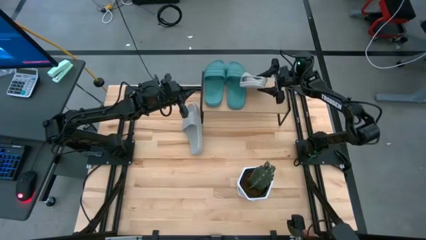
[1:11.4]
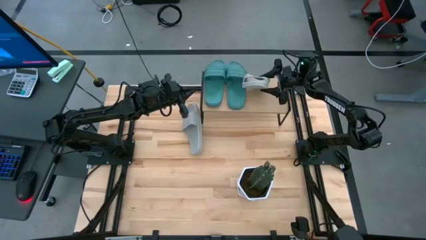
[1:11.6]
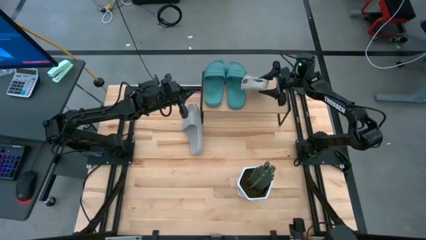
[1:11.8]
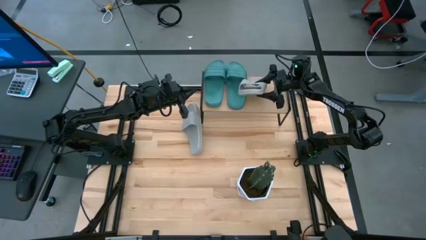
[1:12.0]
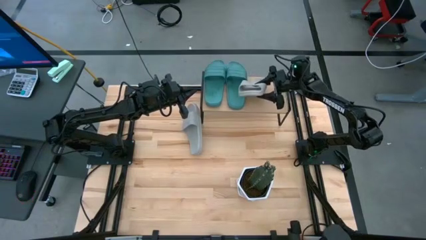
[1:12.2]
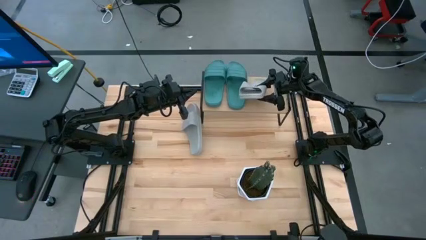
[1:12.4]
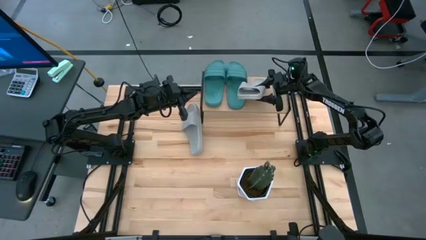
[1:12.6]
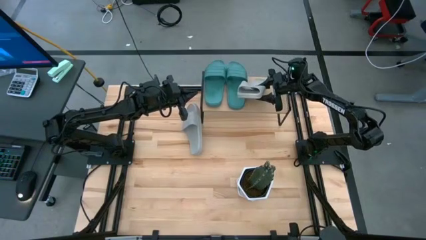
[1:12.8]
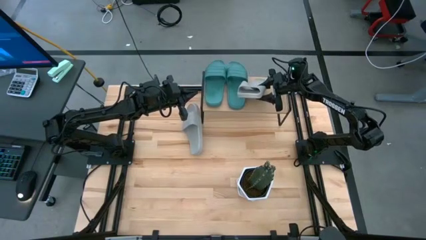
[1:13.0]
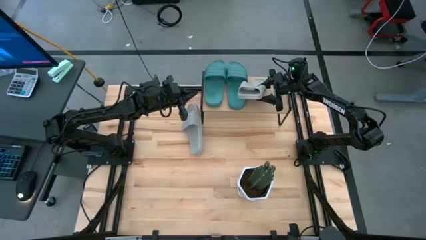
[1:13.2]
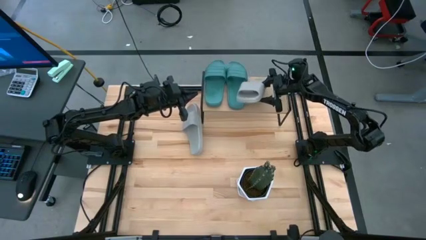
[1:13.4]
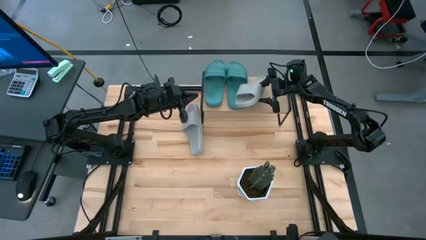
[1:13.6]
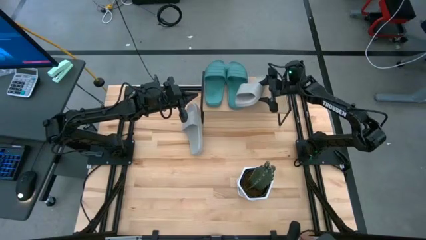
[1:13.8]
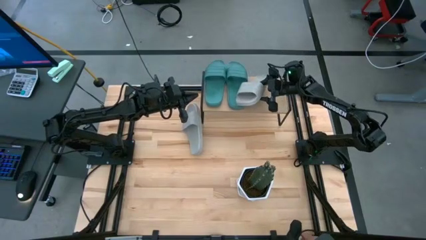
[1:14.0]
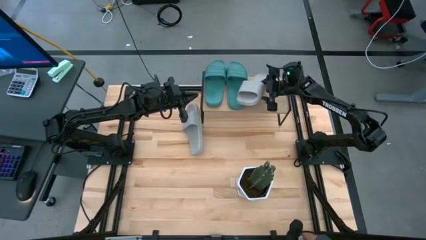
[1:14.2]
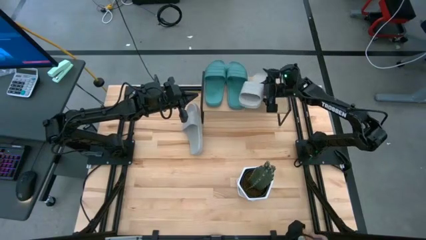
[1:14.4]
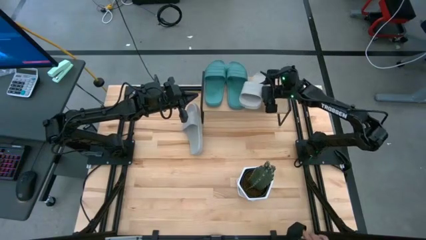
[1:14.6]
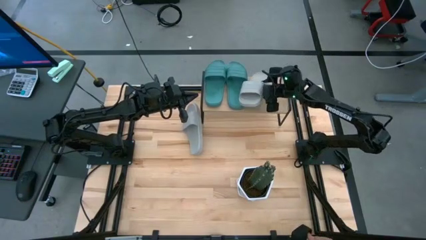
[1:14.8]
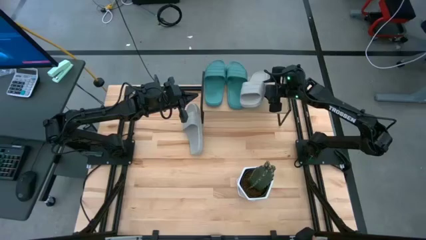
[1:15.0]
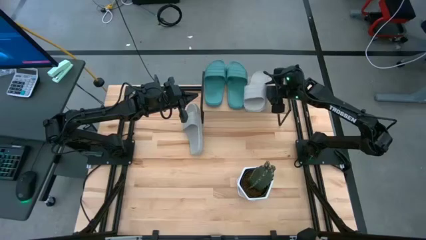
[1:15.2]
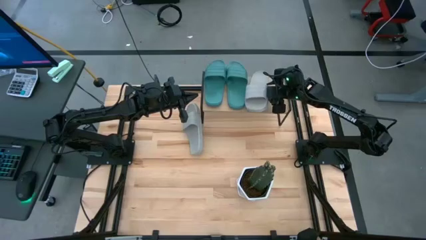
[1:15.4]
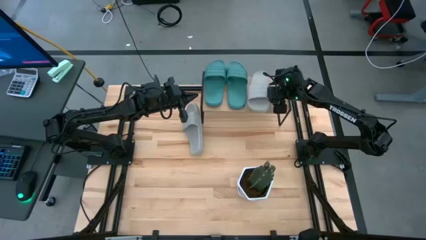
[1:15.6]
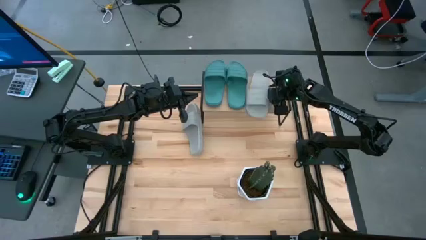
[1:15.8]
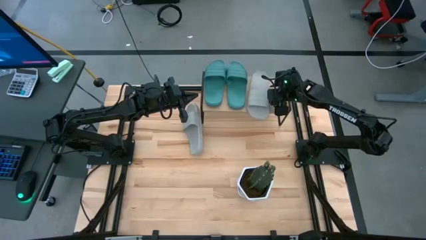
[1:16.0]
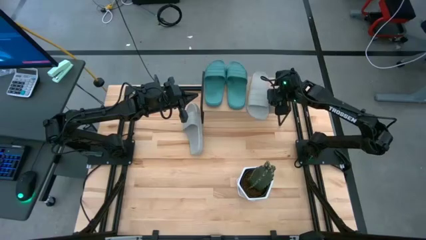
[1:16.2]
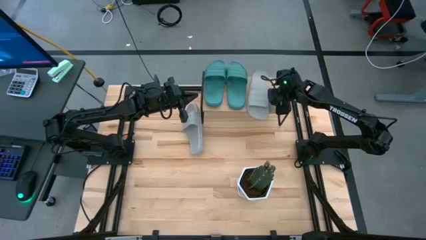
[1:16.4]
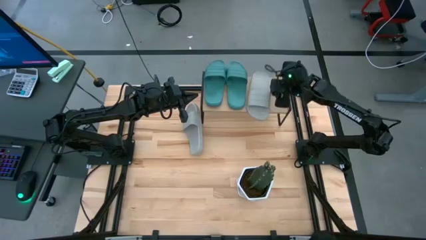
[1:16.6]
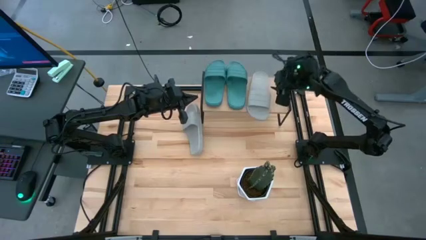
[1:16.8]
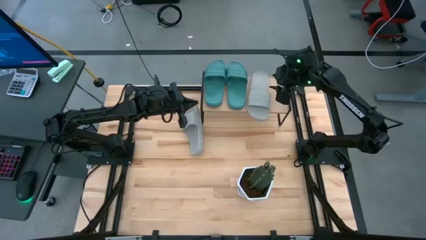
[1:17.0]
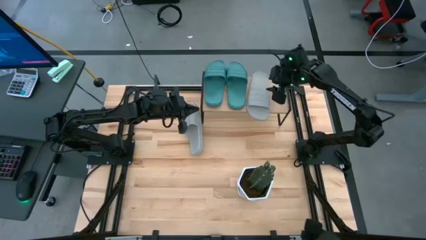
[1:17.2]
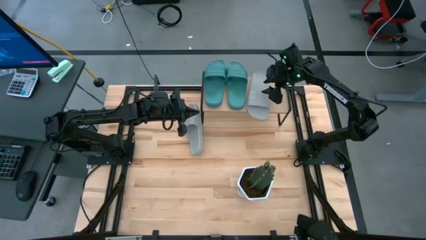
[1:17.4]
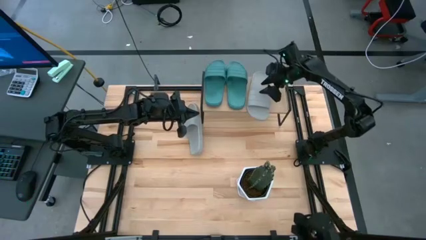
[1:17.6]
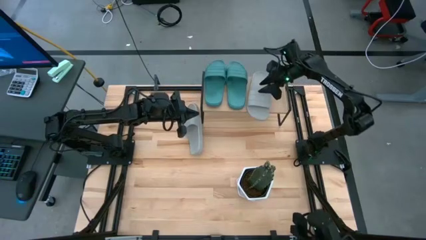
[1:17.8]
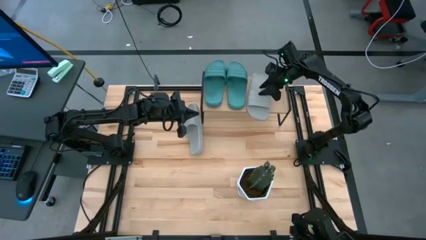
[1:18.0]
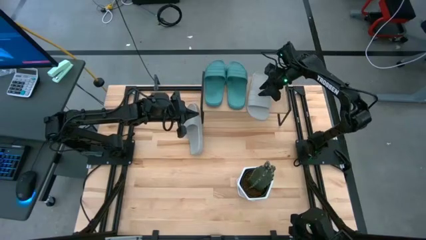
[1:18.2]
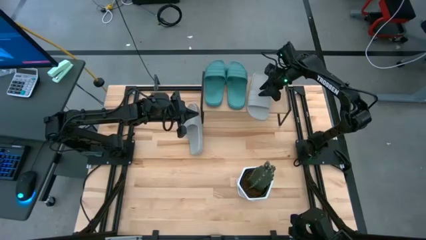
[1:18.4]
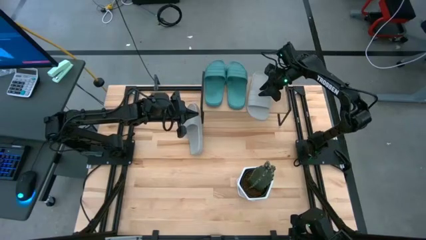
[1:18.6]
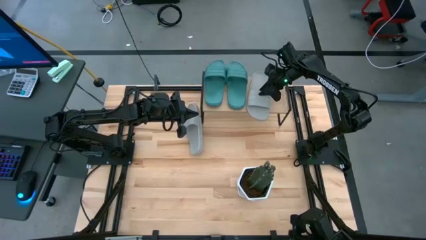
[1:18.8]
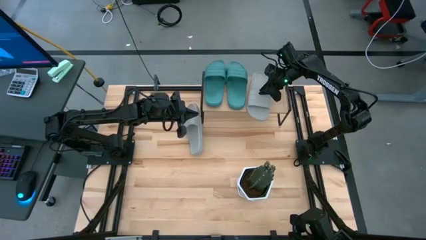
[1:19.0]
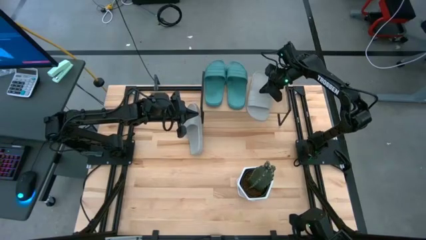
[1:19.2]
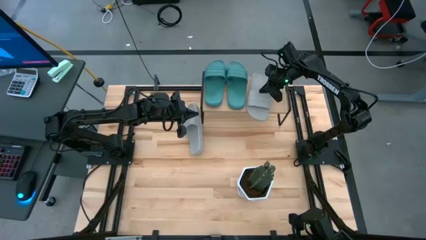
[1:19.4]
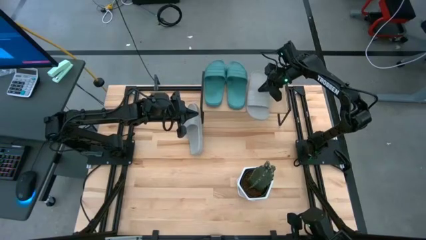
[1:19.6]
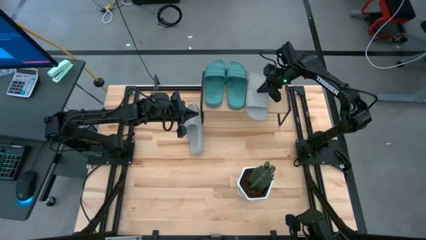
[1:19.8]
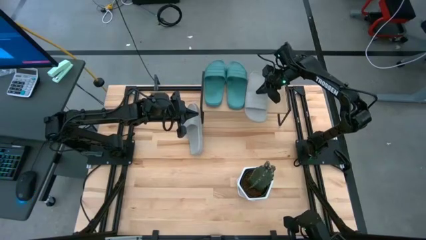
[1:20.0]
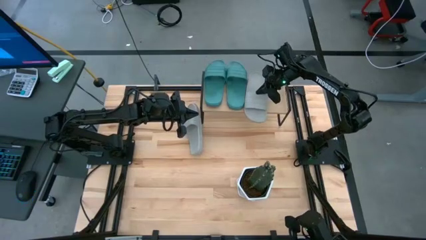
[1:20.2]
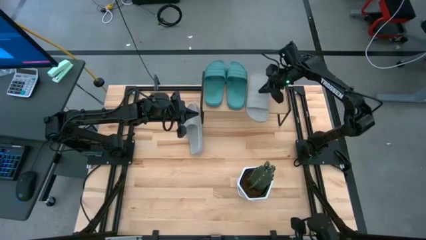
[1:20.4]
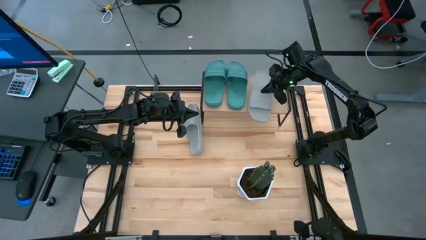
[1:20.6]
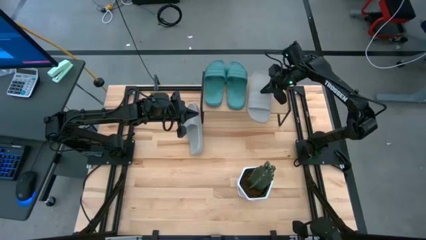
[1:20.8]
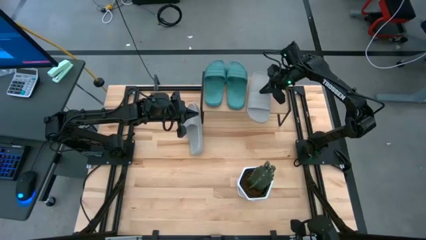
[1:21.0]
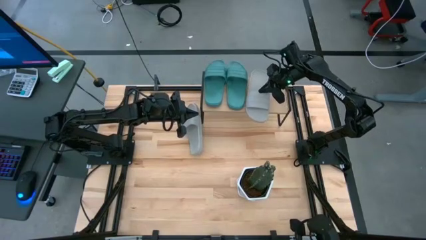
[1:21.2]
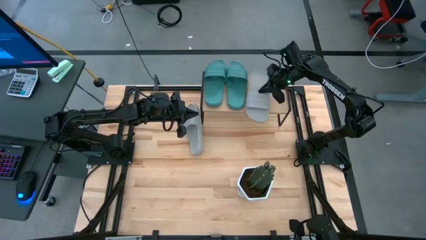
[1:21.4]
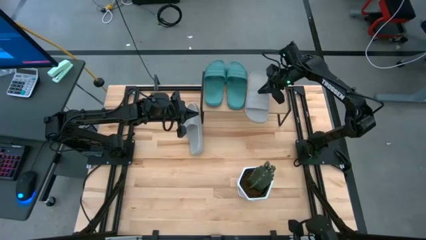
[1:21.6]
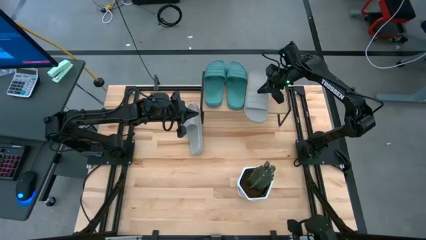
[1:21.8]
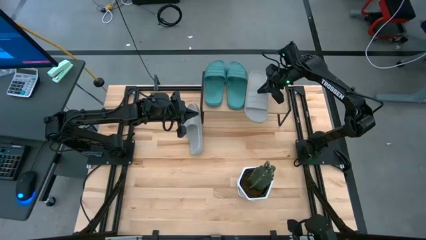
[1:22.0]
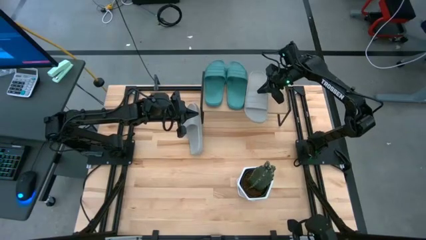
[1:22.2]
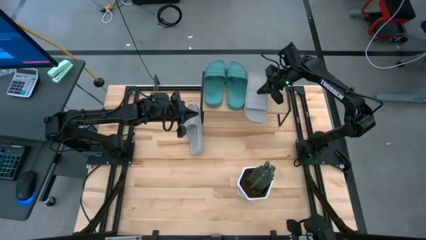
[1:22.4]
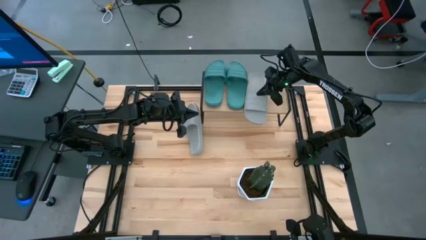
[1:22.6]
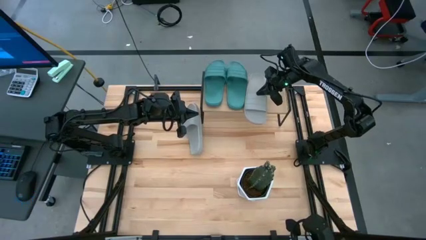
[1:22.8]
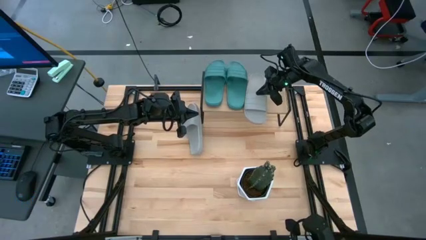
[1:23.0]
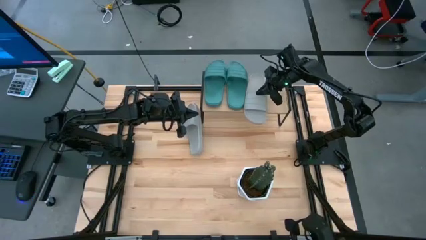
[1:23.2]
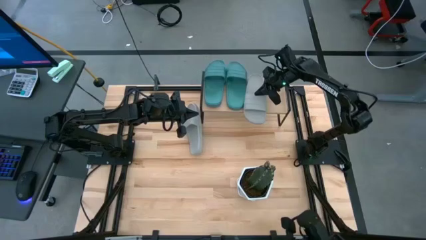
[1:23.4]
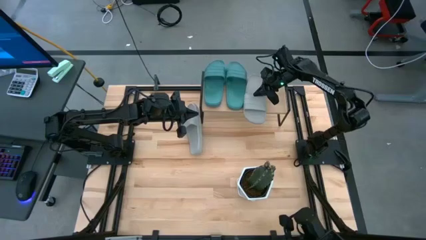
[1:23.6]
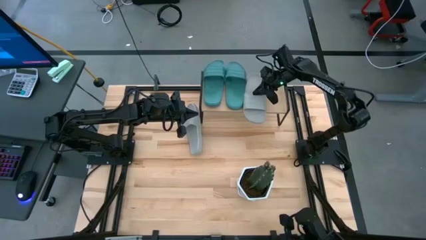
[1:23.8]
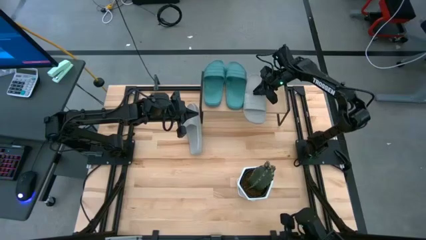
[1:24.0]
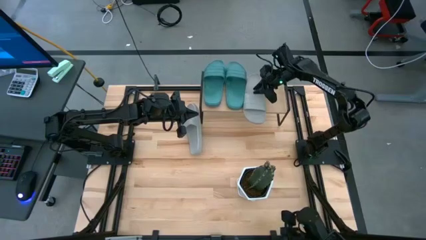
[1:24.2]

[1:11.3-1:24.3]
Task: Pick and place slides into the shelf
Put the bottom gray slides on the shelf

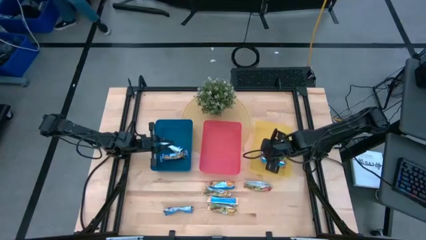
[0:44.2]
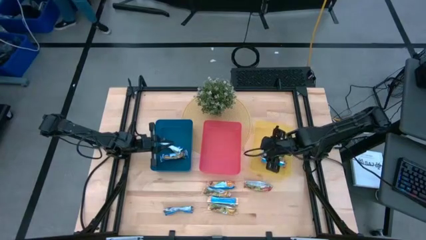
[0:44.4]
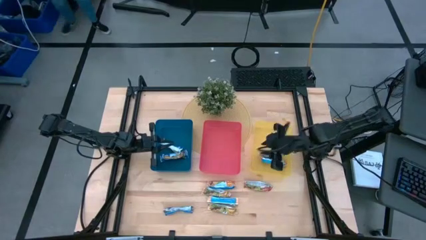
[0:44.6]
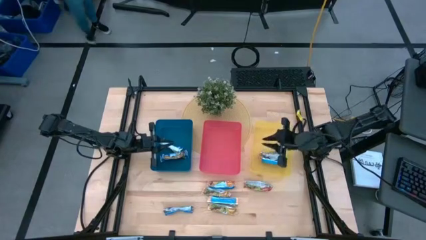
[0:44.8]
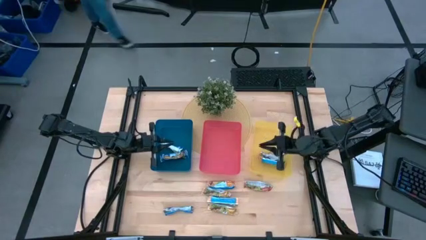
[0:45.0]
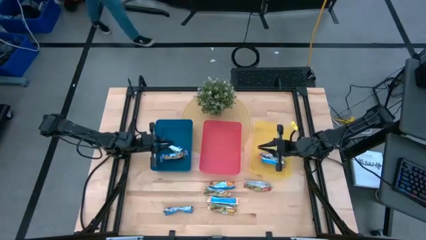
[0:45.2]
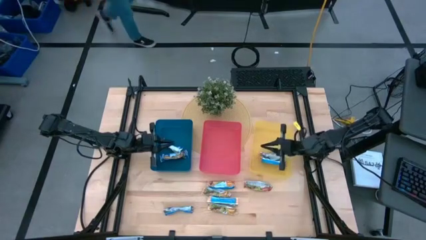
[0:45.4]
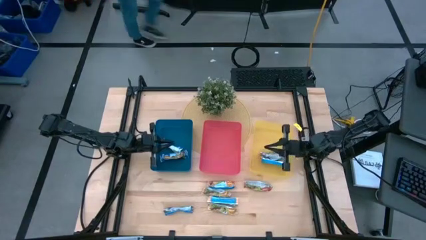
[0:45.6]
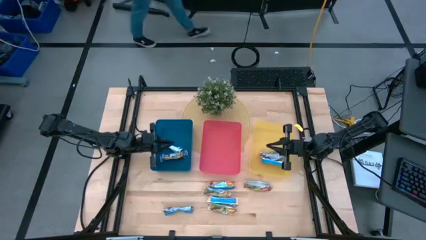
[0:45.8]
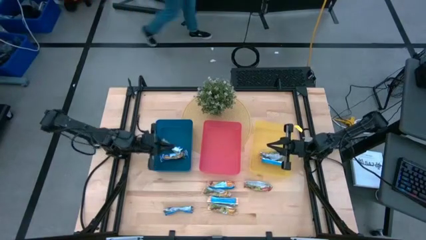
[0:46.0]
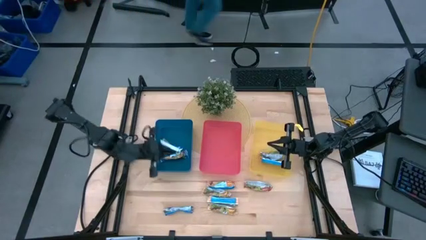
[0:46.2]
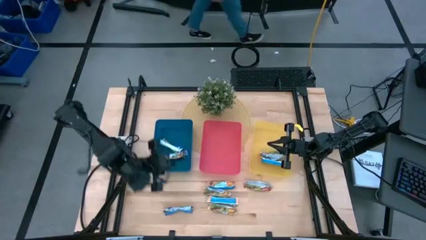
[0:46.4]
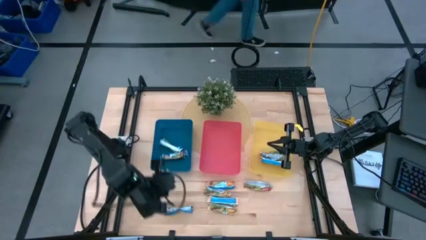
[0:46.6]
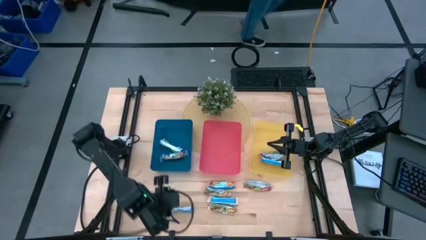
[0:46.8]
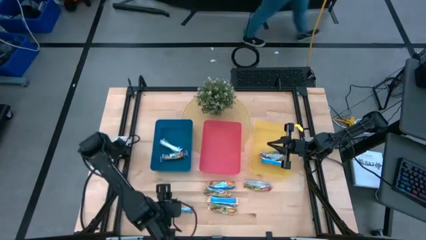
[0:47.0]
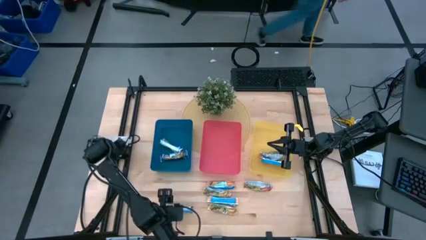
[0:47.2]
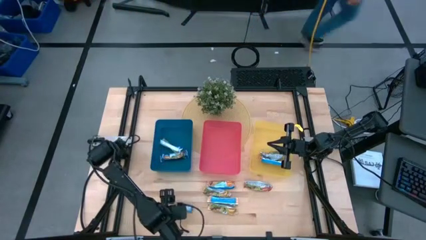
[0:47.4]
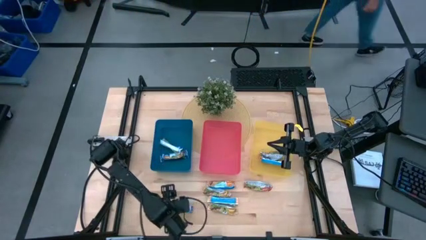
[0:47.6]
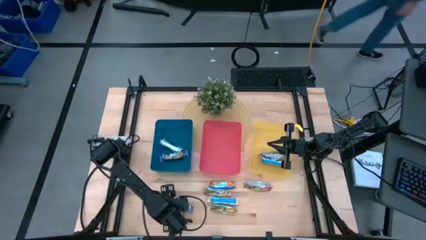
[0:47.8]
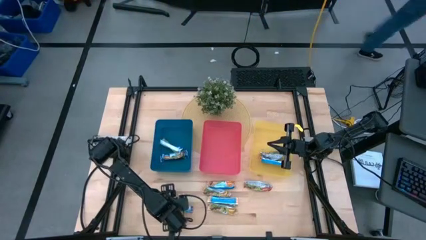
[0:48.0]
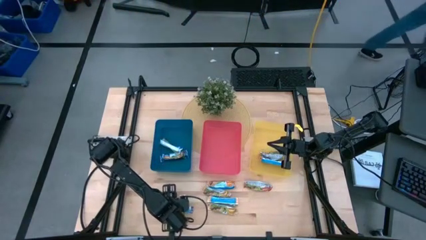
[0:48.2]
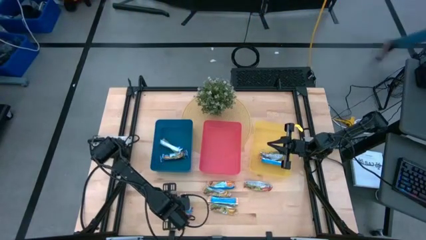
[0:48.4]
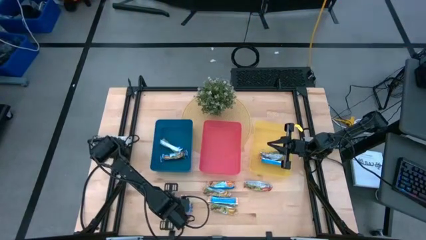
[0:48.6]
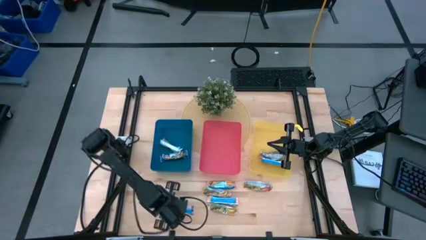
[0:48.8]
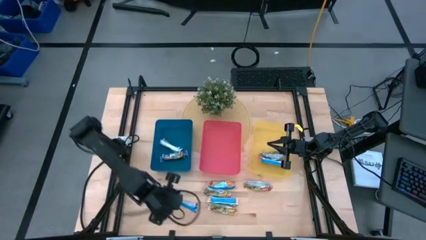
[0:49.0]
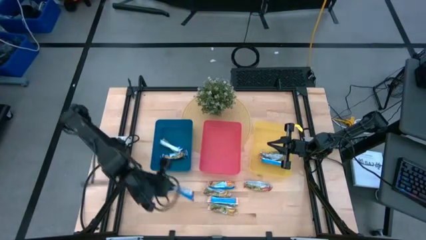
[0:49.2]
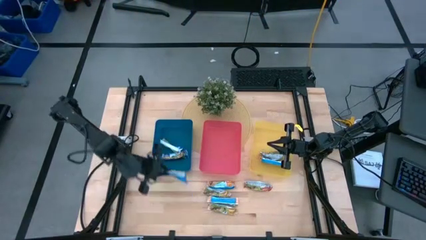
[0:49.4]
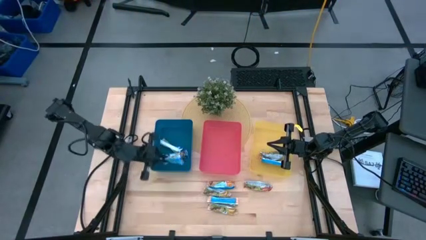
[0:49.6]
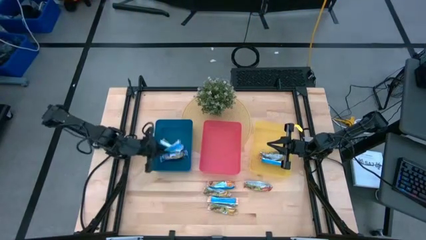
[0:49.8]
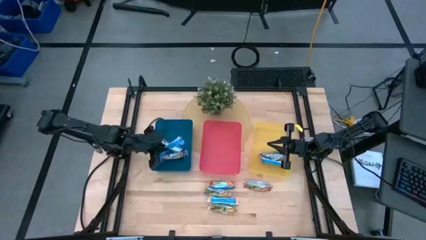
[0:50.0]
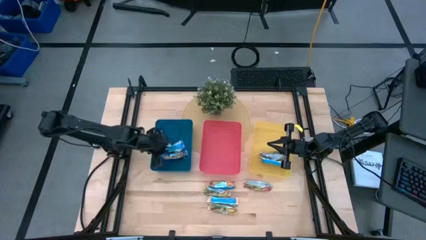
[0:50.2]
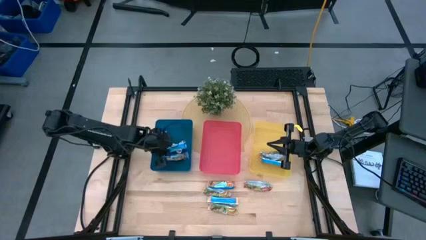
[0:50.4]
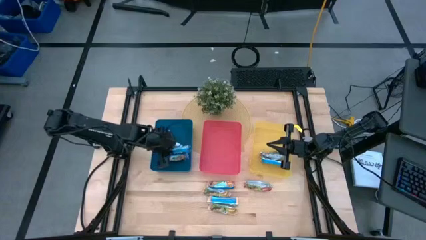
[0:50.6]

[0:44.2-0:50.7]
Task: Pick and place Granola Bars by type
Put the blue granola bar into the blue bin
